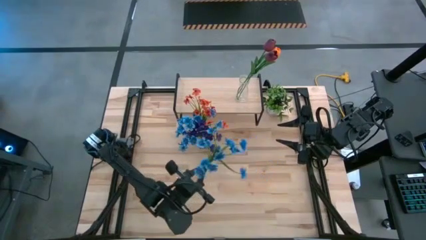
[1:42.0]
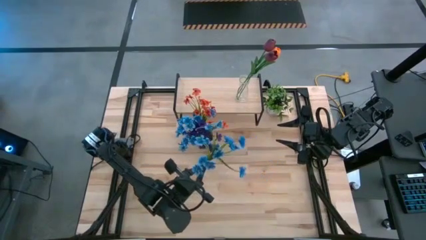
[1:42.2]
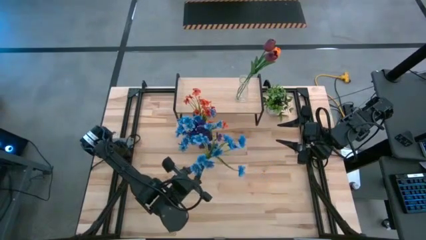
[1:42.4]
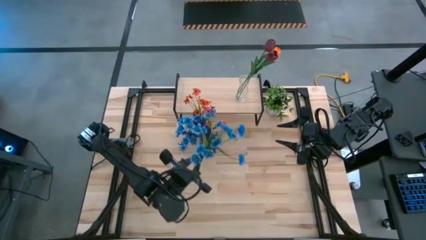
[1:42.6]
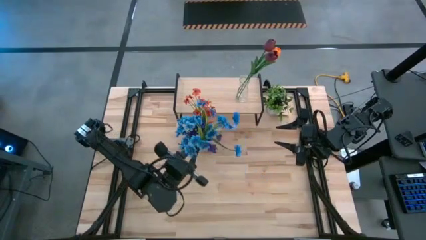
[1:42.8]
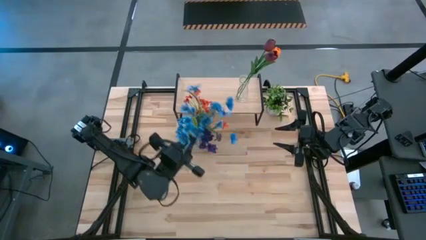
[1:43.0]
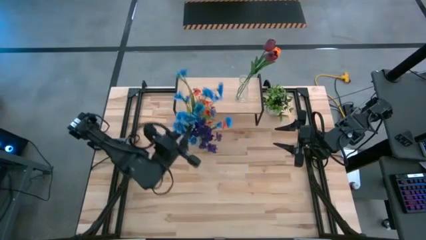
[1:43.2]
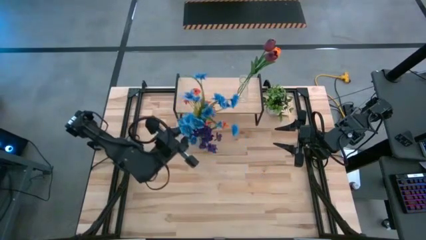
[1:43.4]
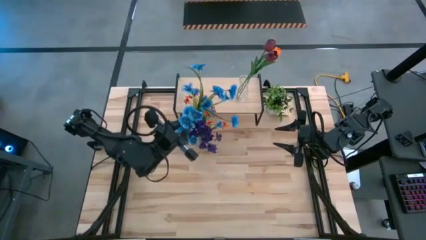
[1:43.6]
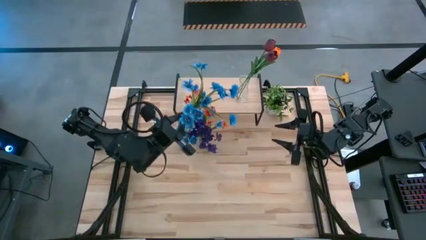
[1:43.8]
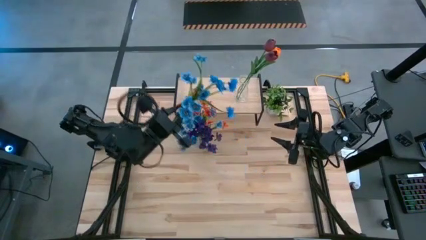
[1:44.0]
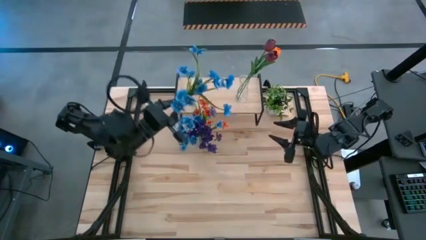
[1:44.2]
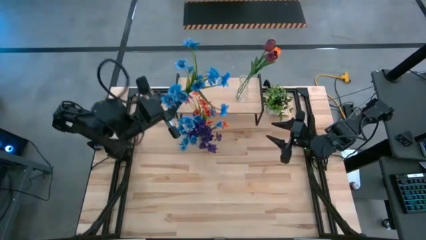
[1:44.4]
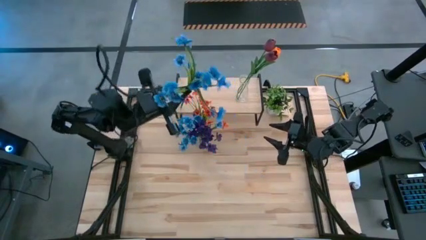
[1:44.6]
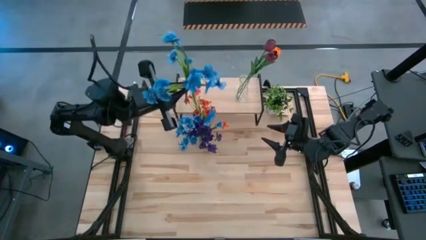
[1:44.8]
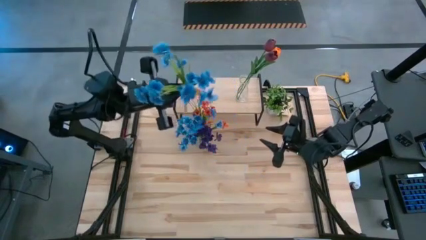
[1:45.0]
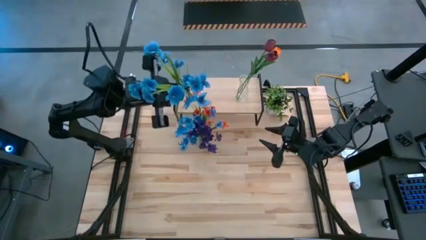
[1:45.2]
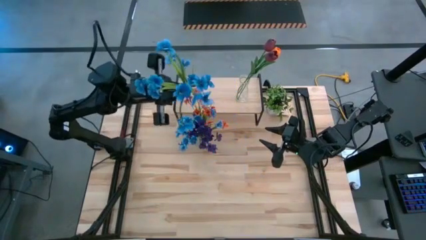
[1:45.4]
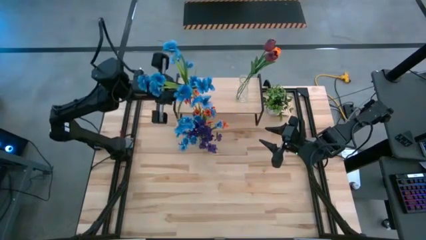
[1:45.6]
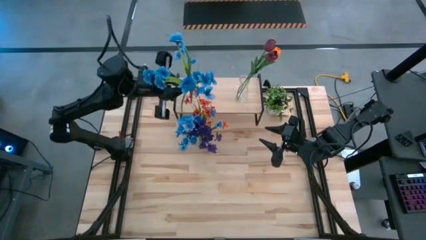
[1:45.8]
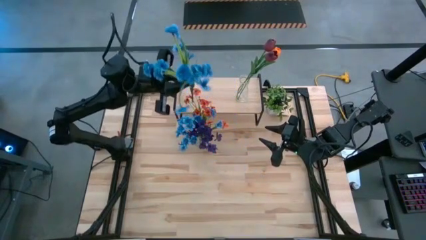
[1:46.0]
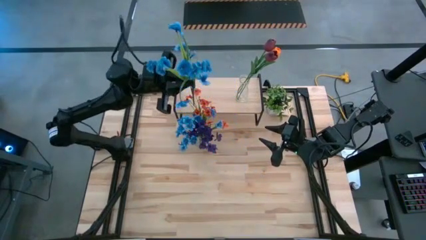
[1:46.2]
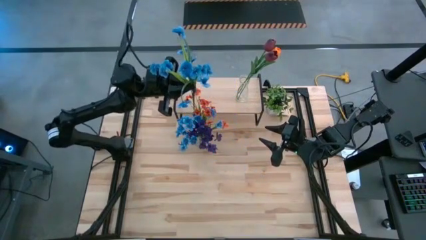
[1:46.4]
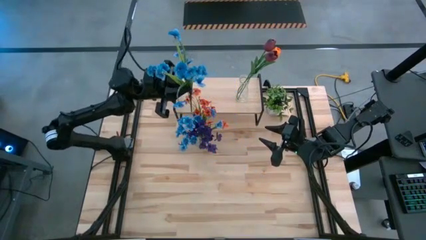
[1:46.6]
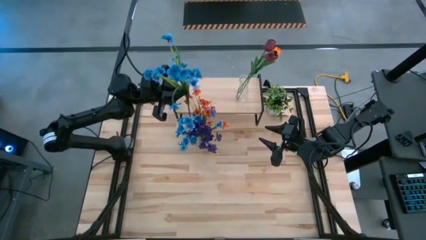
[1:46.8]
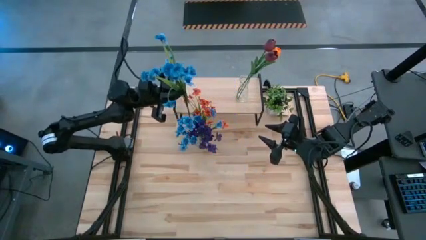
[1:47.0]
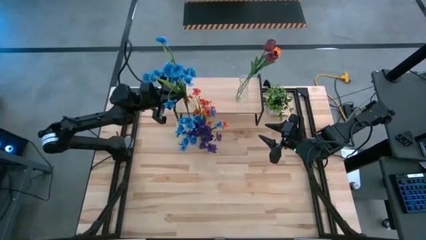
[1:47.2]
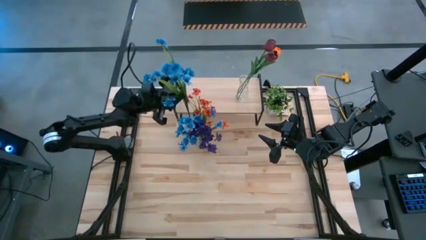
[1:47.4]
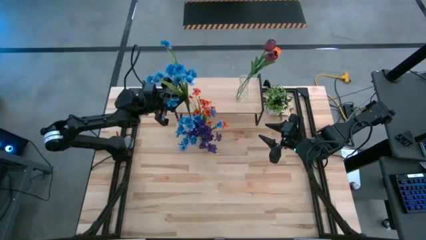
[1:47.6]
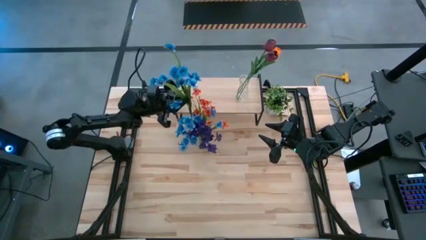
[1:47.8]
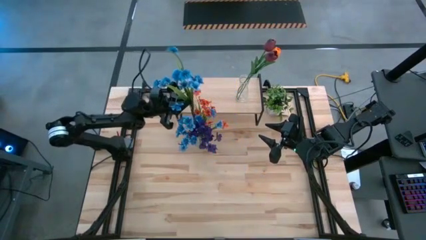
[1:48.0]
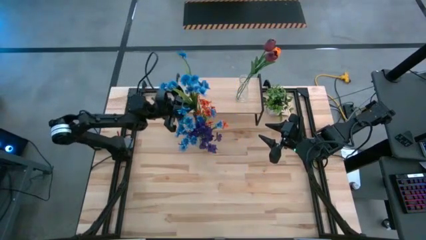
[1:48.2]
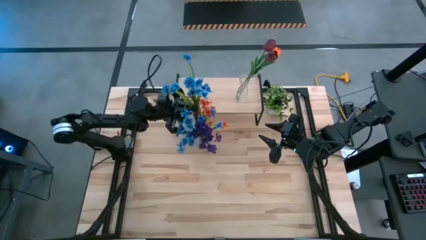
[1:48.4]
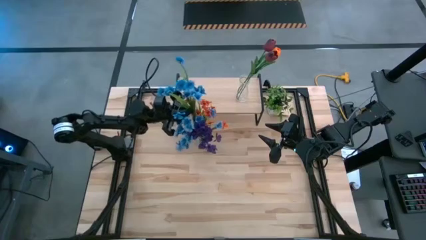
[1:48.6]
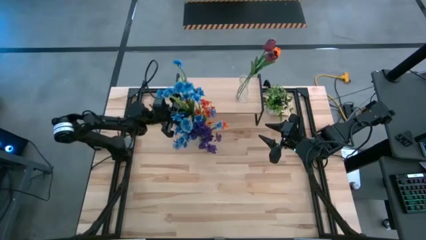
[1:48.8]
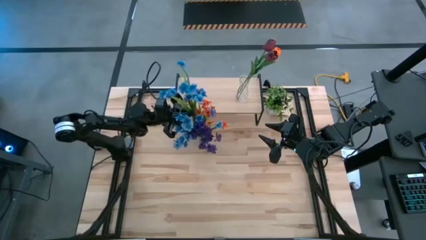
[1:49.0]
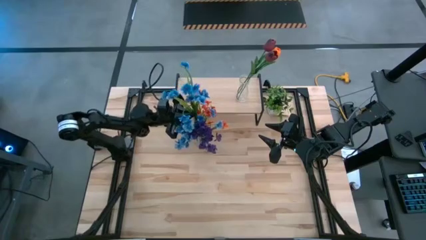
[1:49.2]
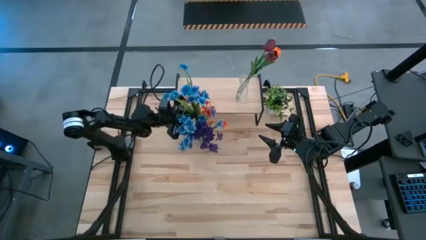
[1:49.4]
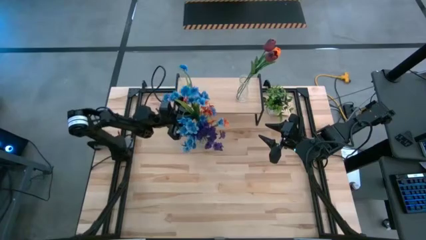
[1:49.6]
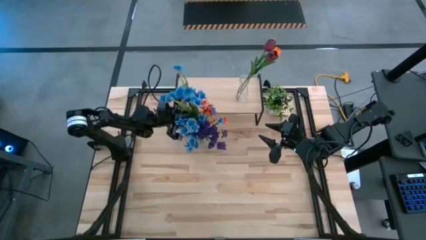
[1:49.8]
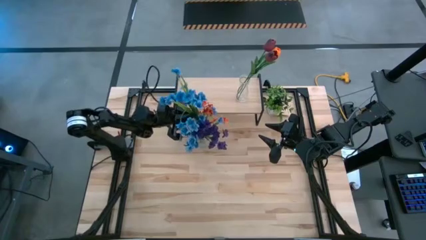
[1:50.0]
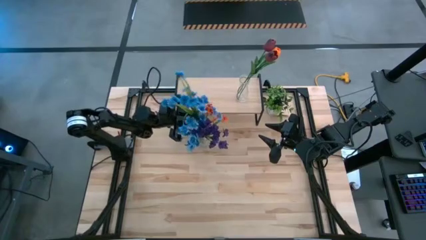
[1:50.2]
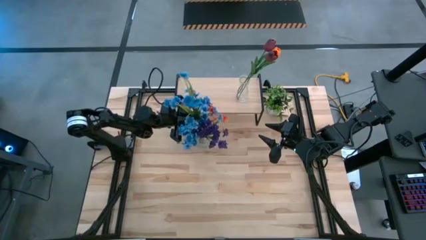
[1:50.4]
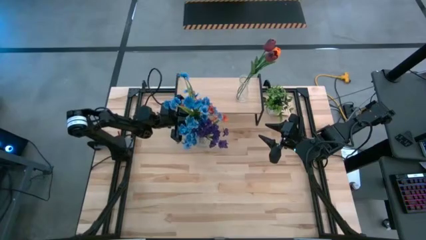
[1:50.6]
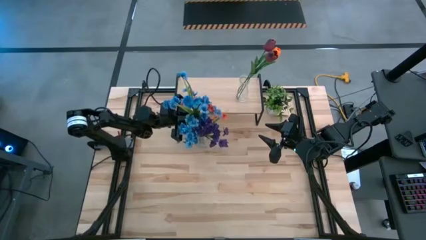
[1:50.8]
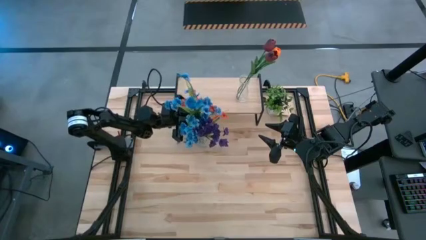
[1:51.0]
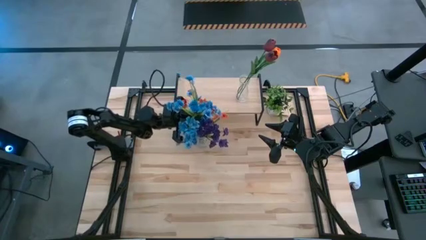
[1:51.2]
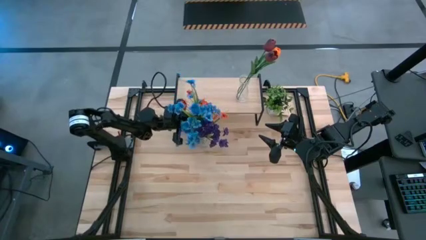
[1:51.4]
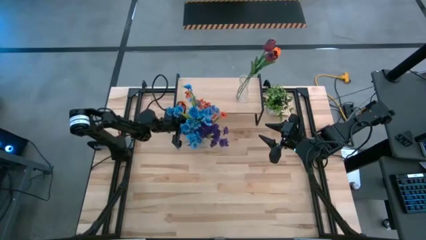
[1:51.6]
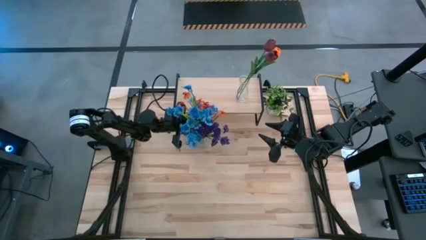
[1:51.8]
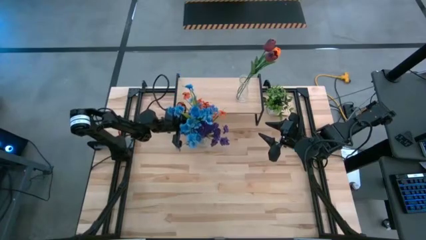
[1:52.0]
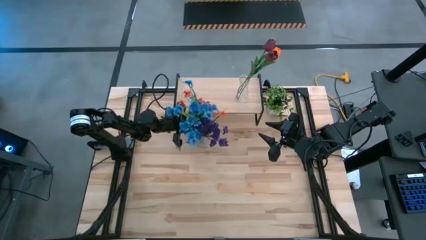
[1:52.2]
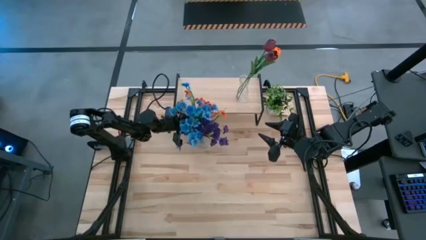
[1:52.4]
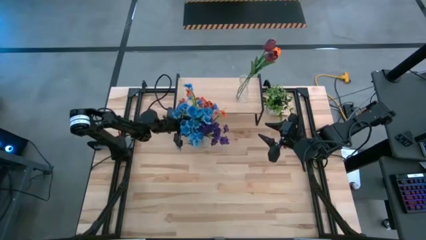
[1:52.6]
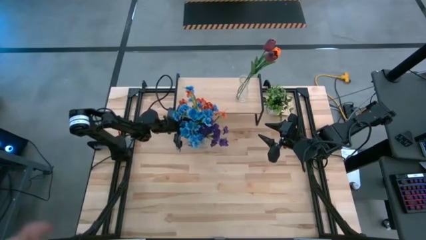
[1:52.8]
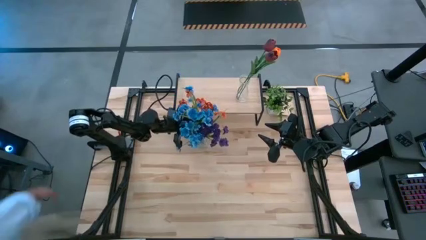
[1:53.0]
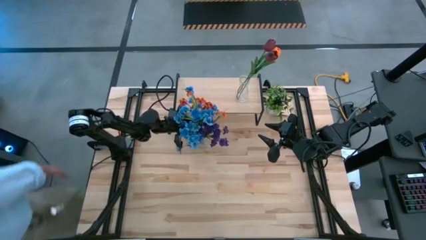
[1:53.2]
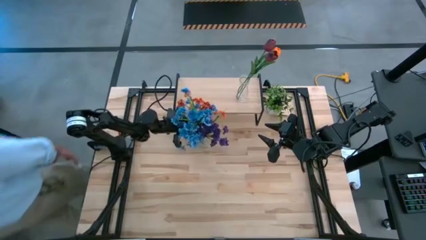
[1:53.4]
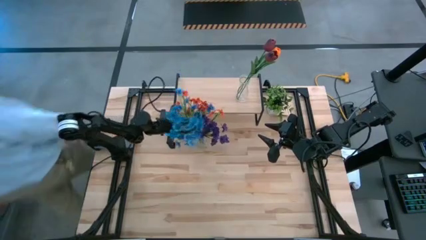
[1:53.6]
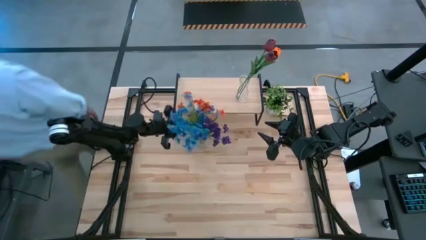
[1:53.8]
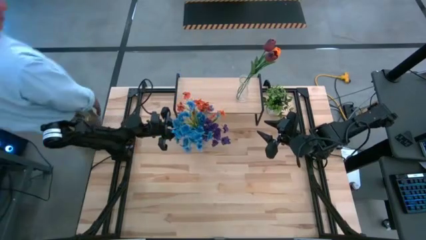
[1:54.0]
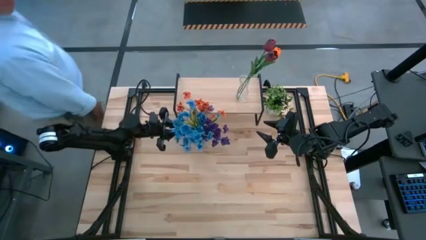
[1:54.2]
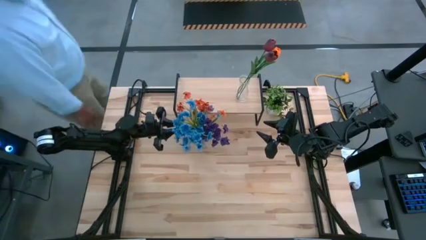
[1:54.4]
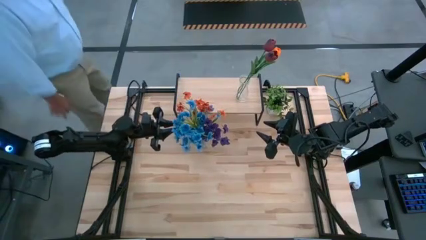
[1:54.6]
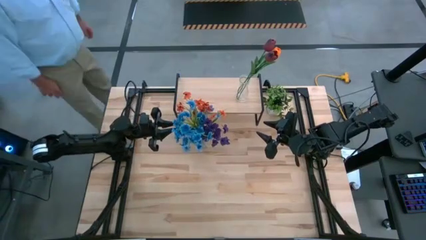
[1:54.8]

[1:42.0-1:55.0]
Task: Pick and place flowers into a vace then onto a shelf
Put the blue flowers into the transparent vase
